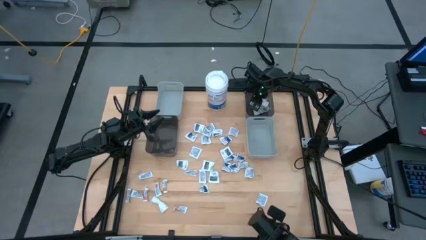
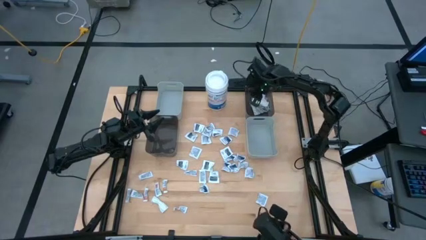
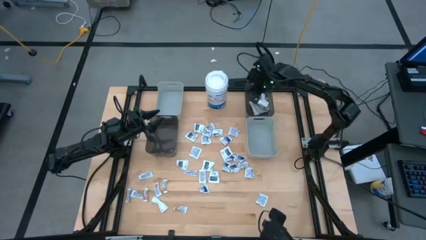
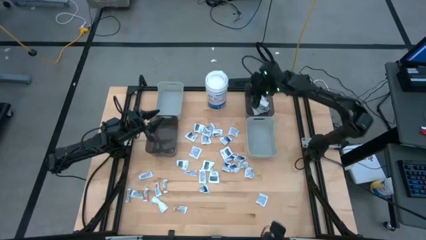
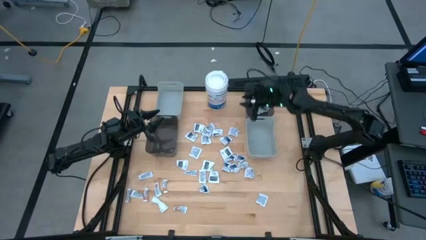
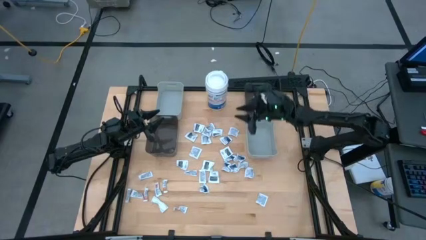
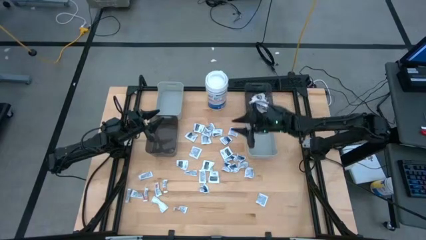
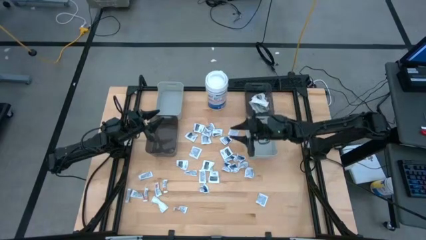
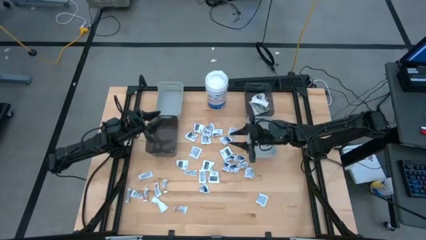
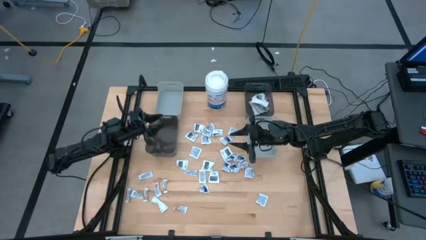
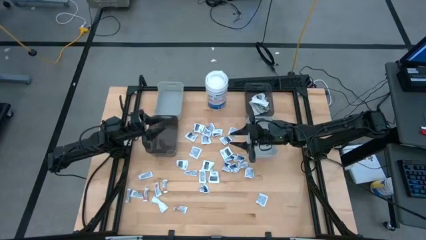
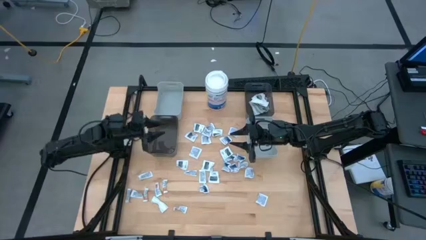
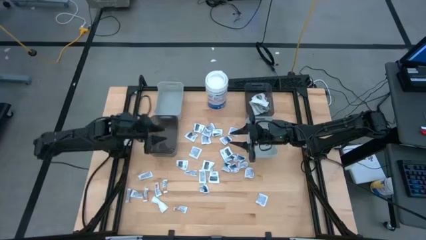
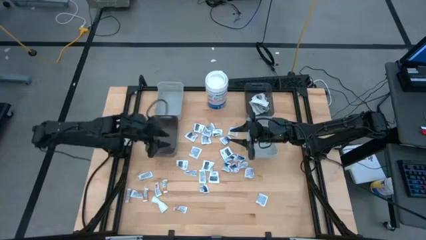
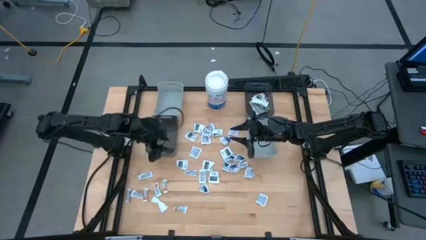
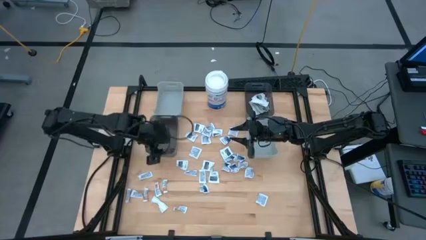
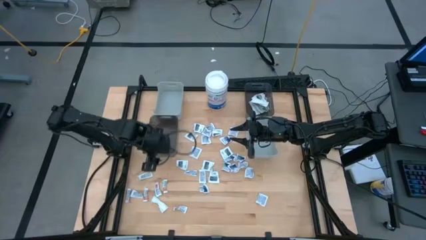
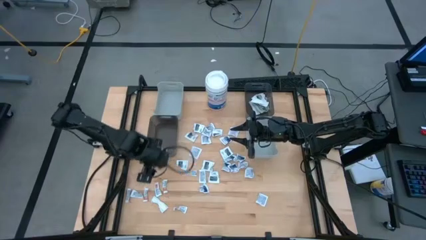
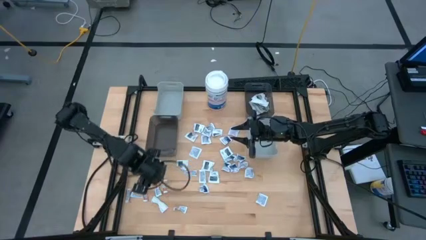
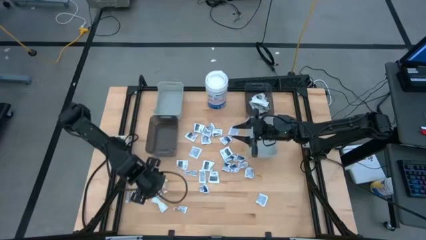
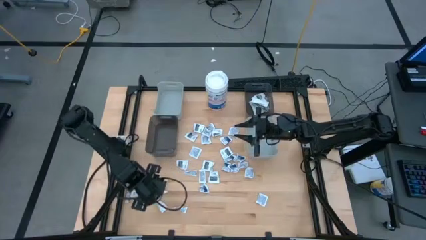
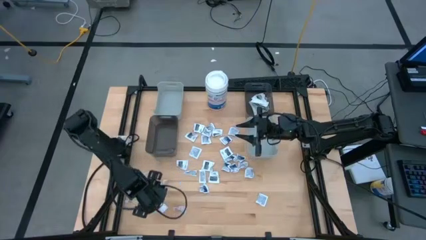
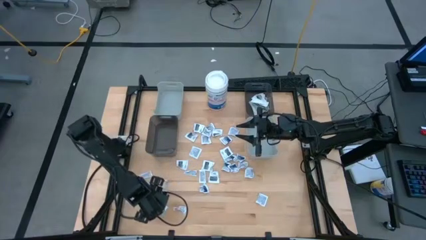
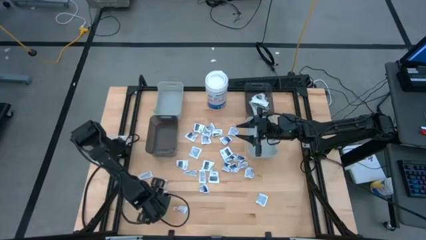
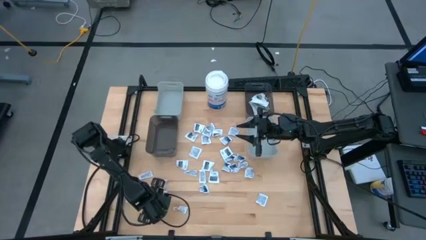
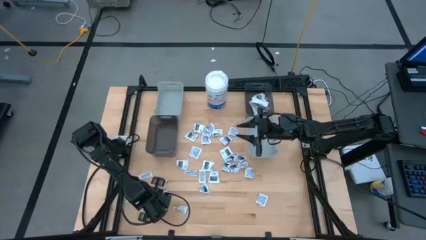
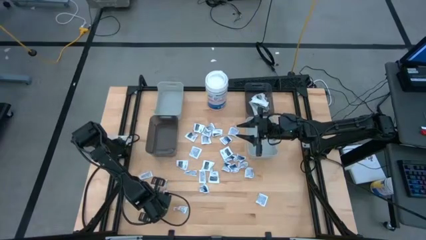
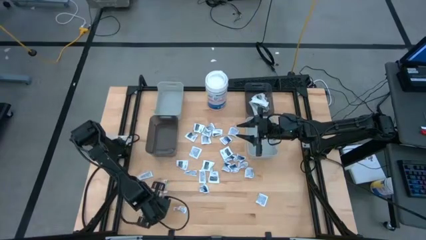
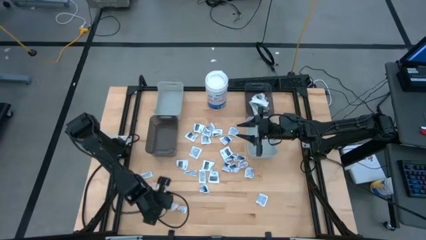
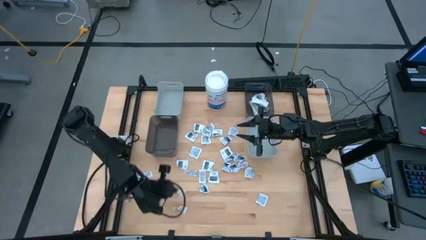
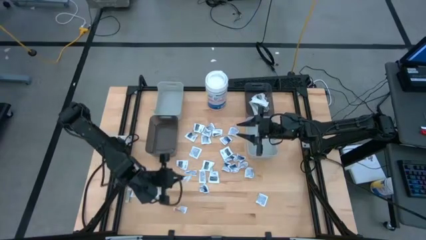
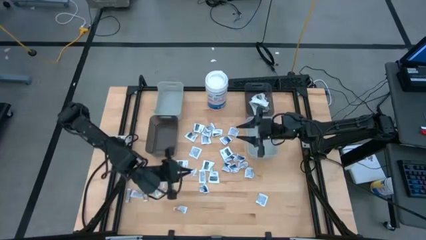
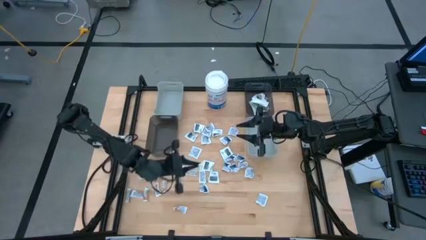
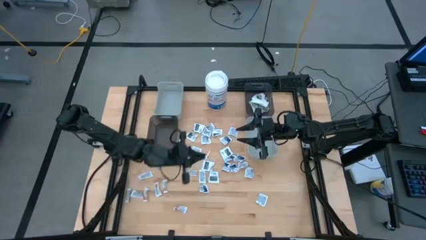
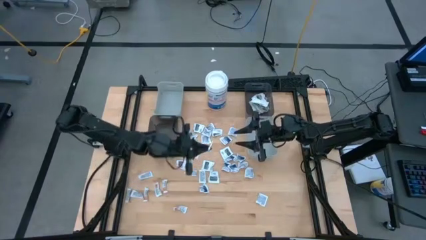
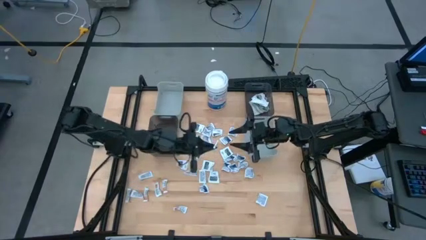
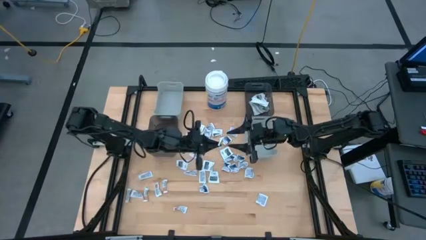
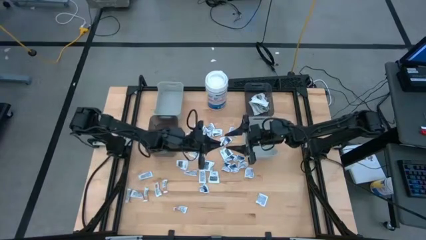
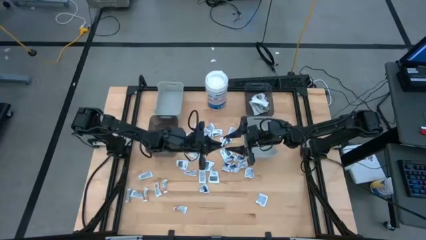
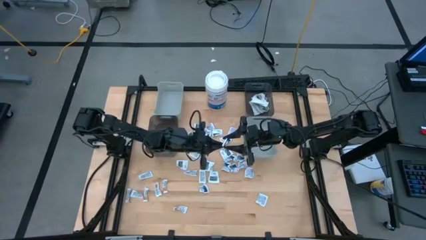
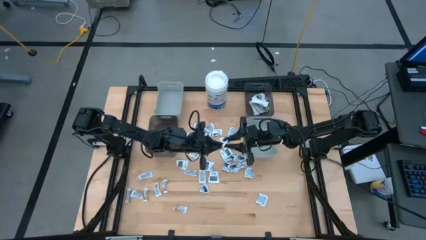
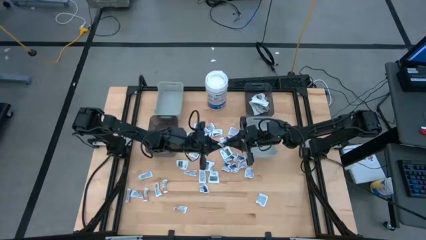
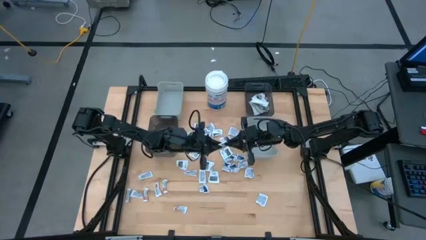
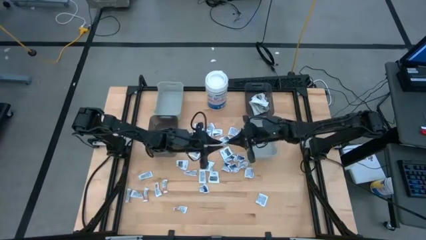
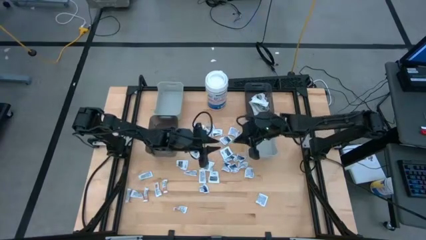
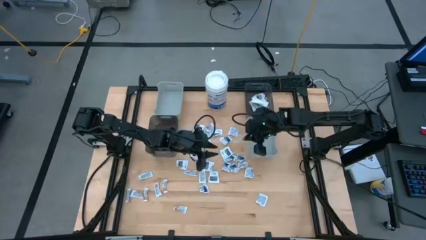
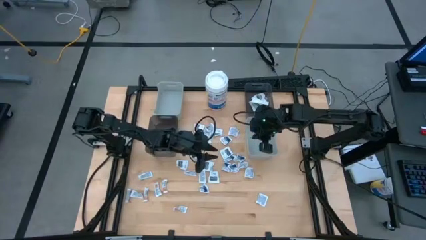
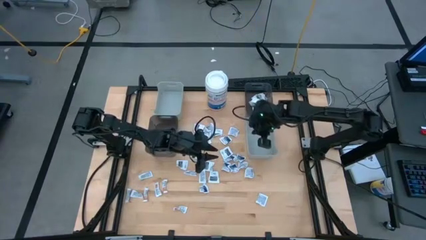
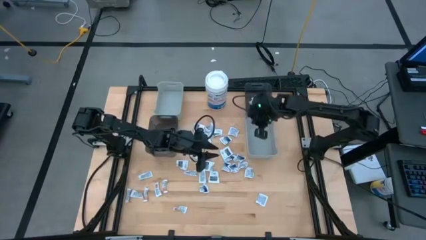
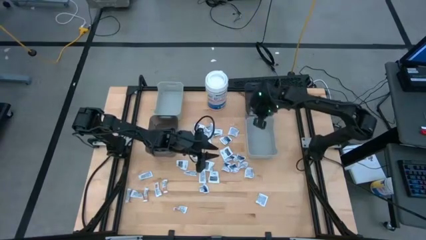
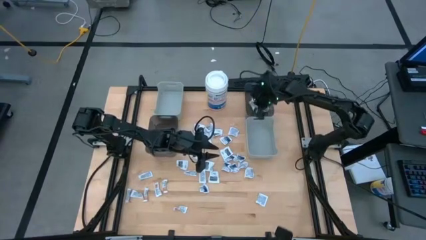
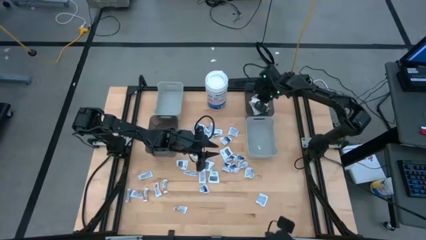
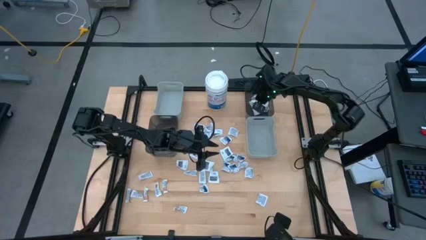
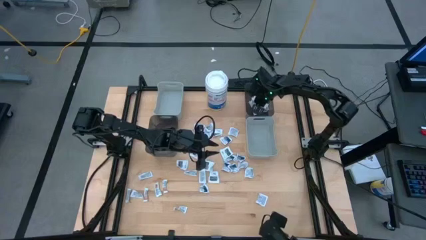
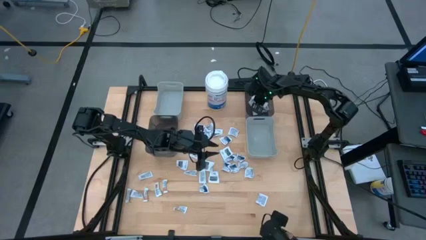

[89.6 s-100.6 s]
Task: Pick & Place First Aid Supplies
Put the green bandage into the right black bin

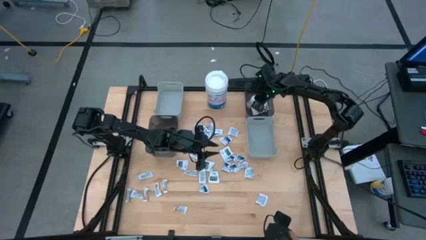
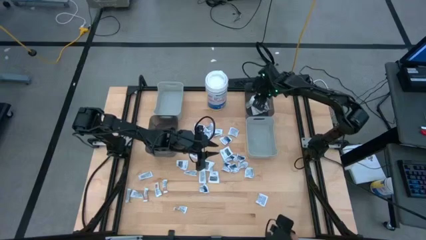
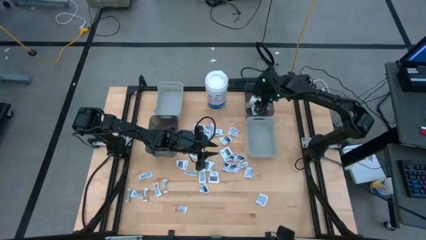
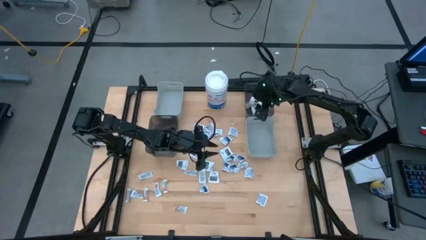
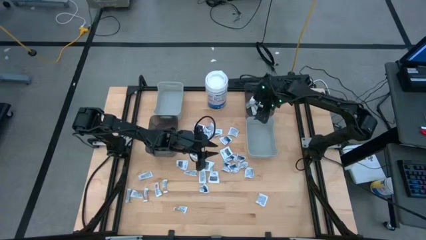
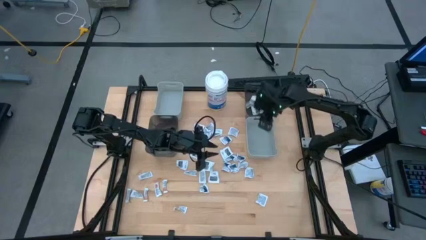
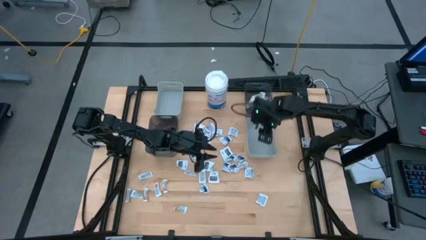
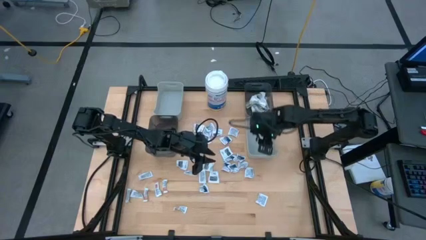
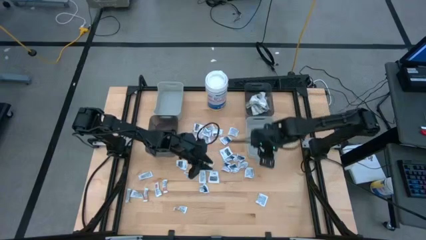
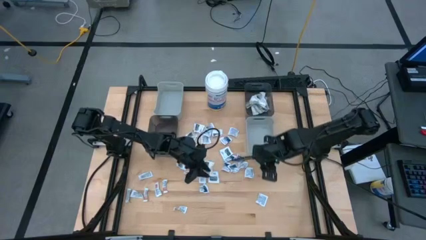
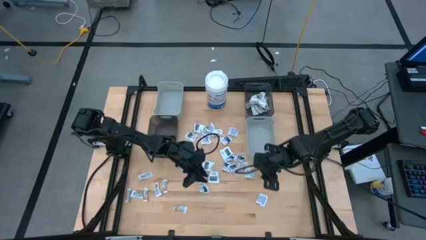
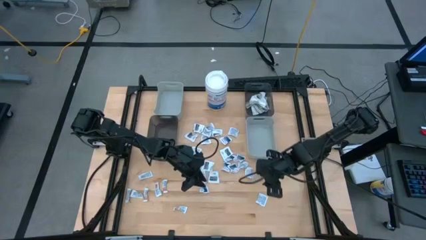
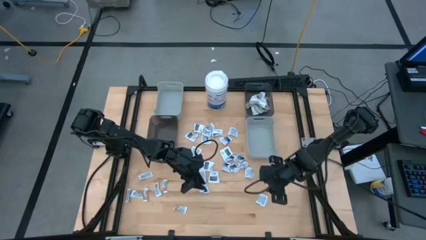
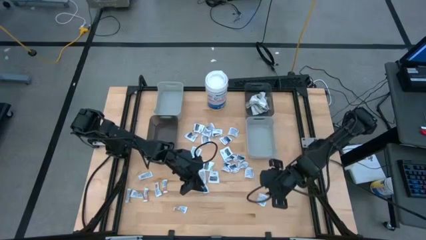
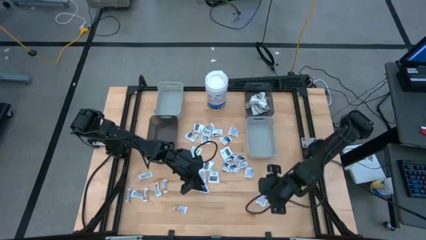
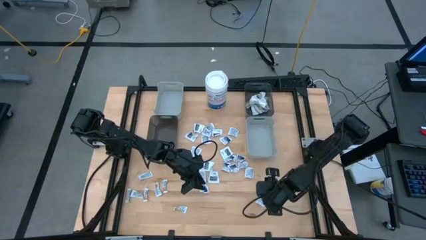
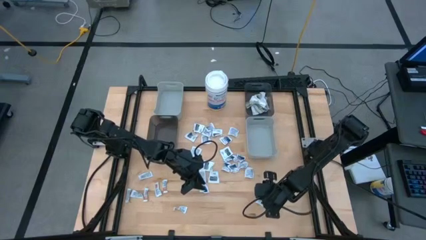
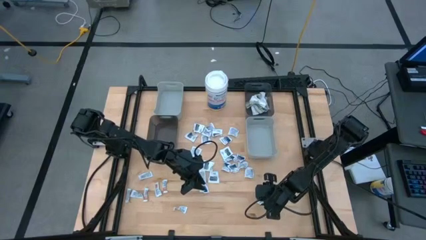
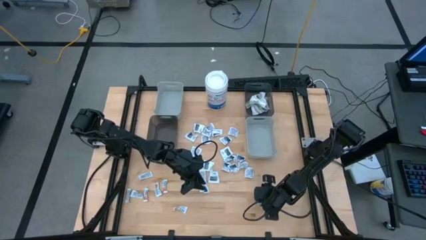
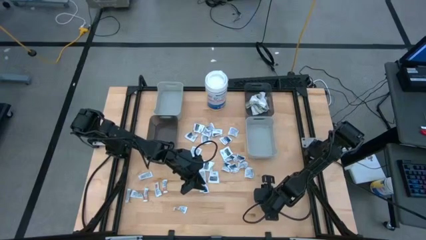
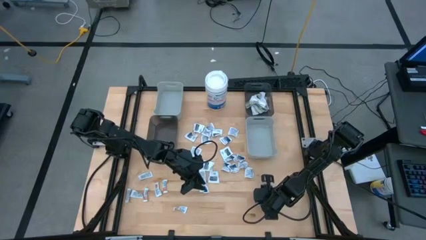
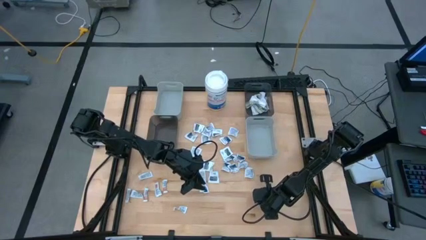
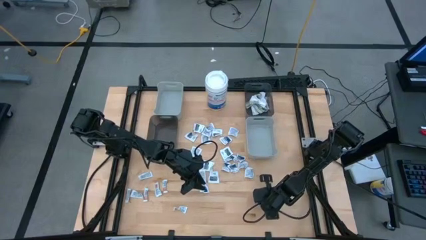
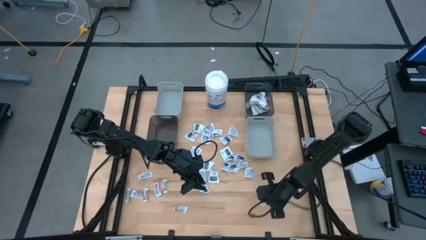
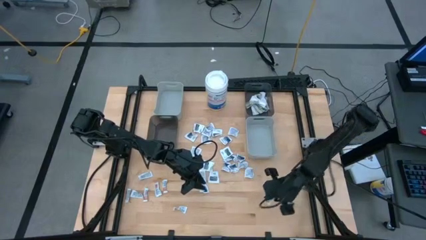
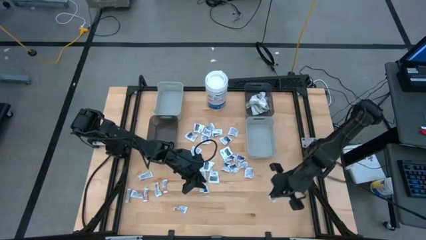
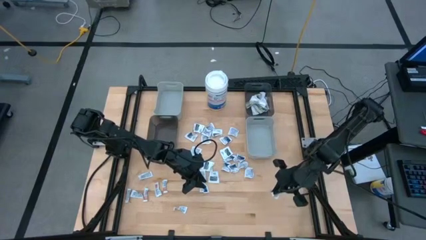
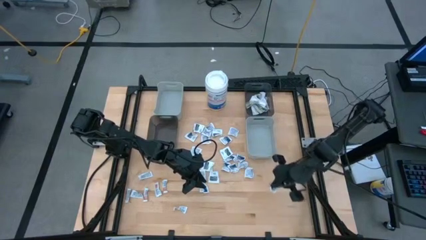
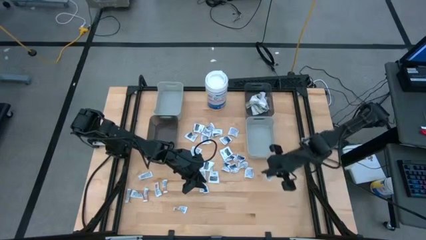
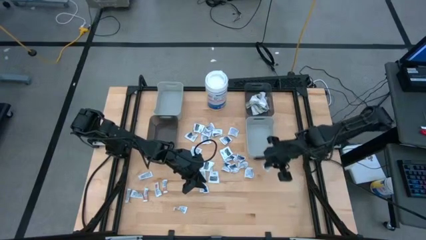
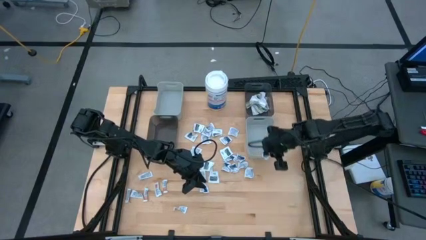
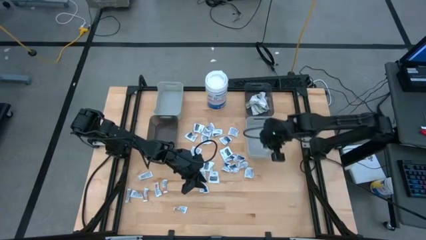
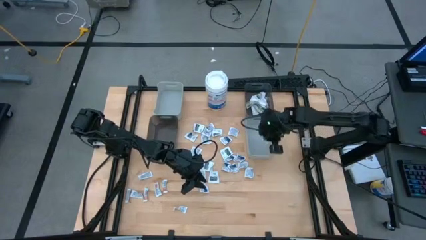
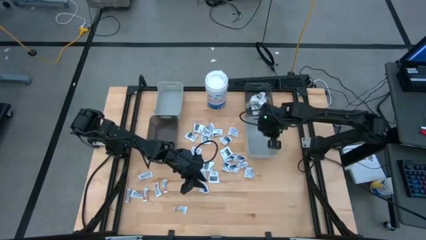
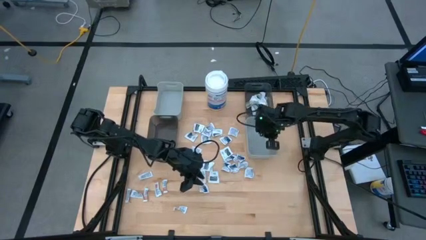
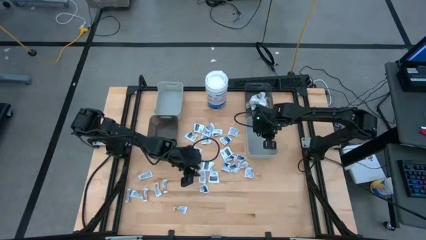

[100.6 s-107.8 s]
Put the blue alcohol pad into the right gray bin
